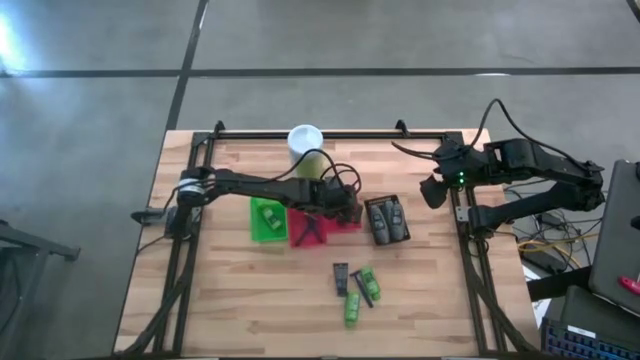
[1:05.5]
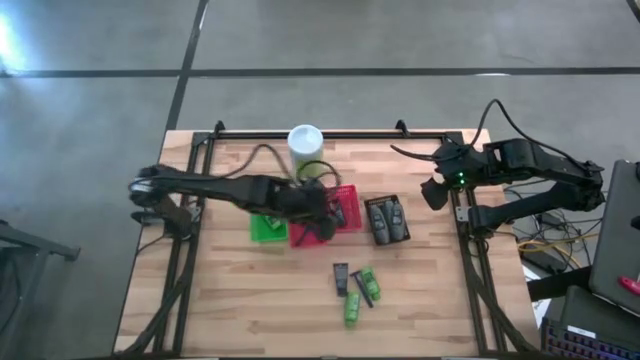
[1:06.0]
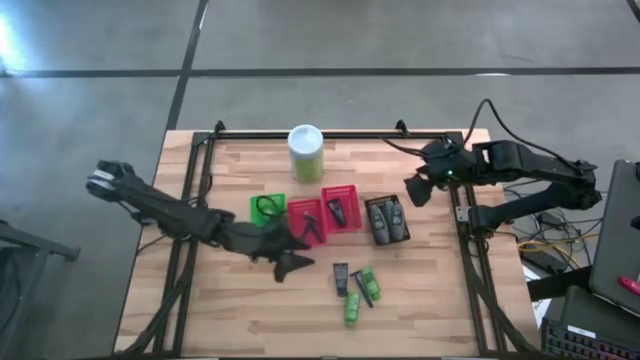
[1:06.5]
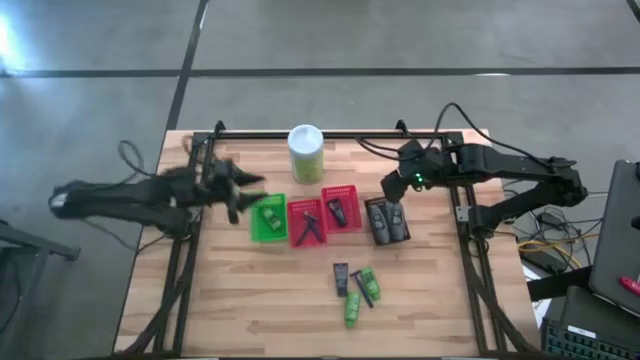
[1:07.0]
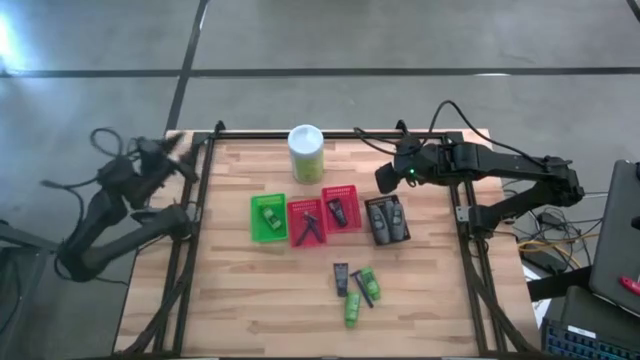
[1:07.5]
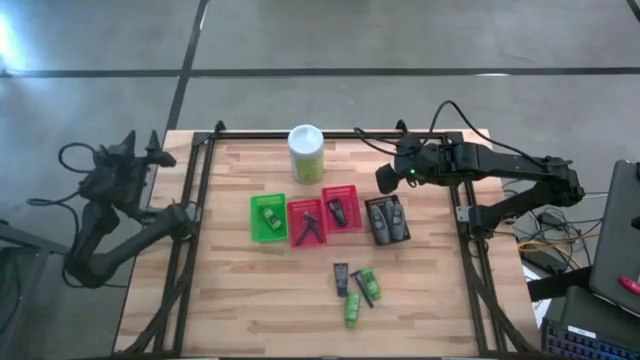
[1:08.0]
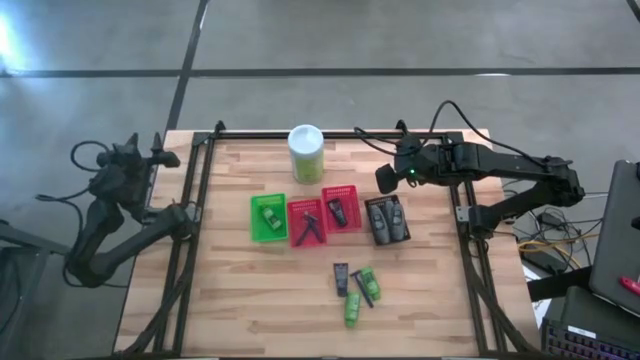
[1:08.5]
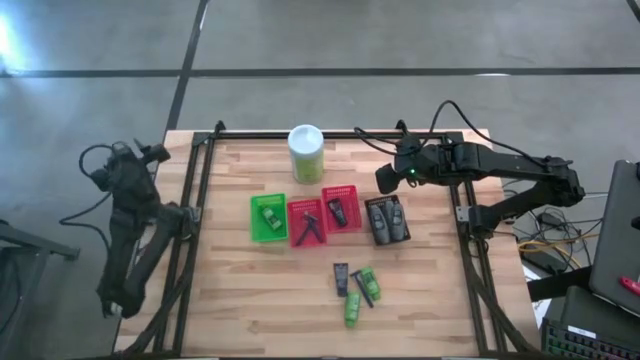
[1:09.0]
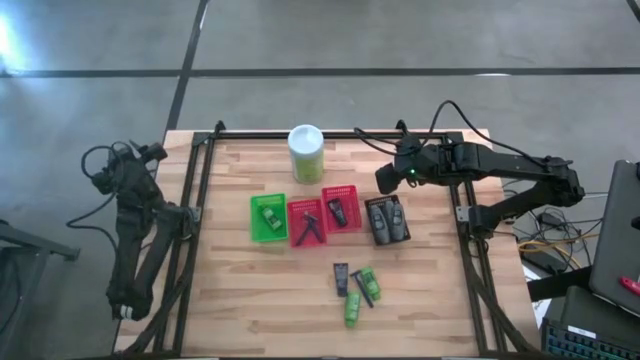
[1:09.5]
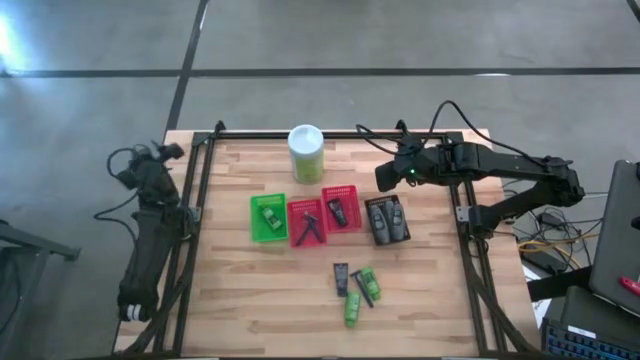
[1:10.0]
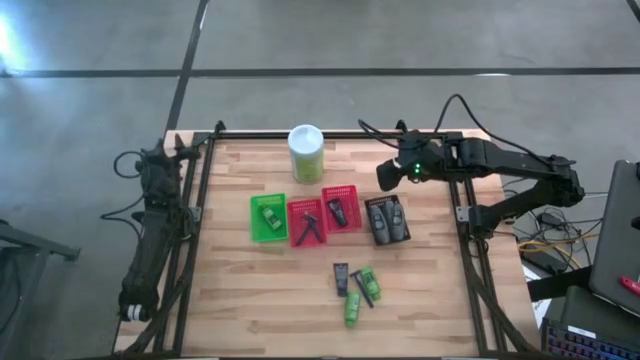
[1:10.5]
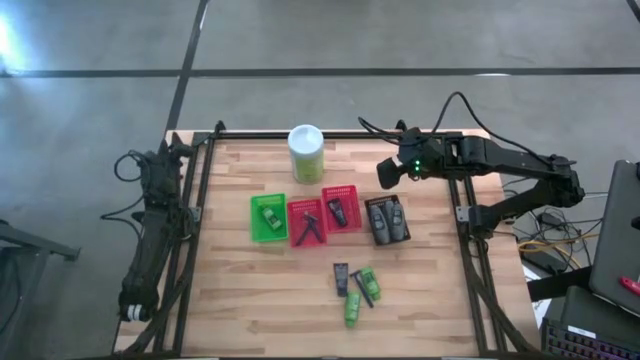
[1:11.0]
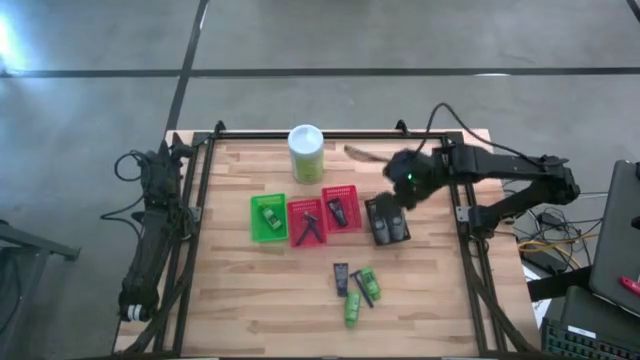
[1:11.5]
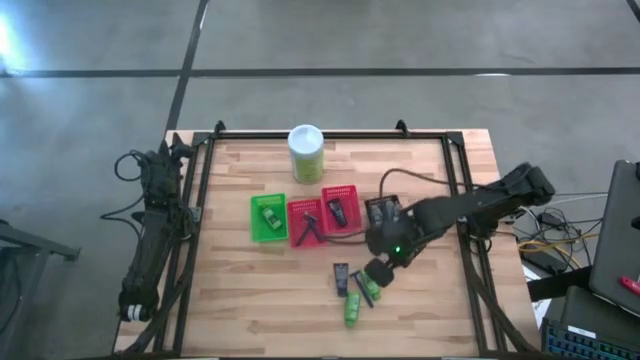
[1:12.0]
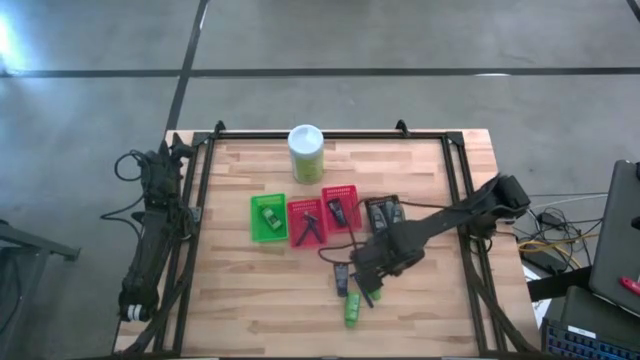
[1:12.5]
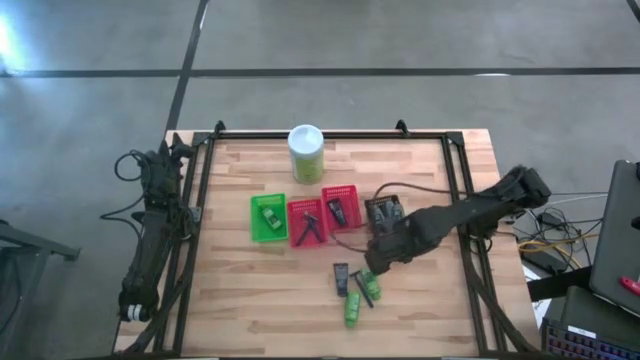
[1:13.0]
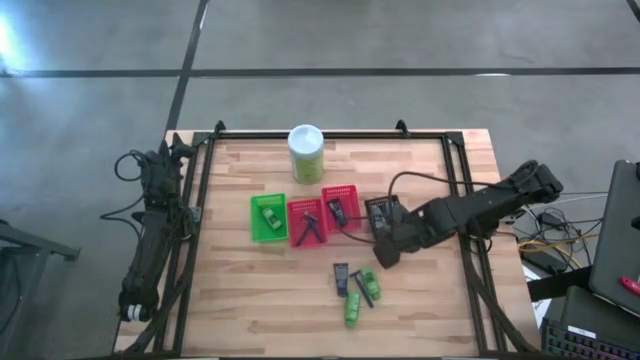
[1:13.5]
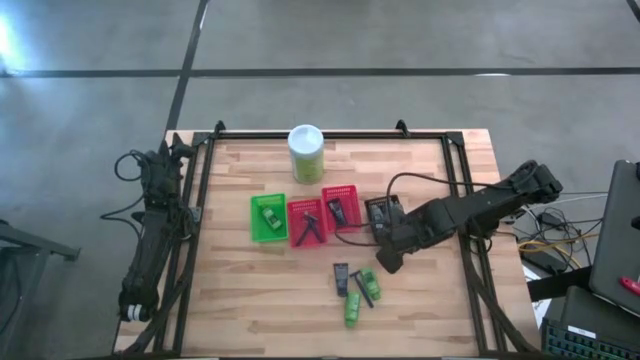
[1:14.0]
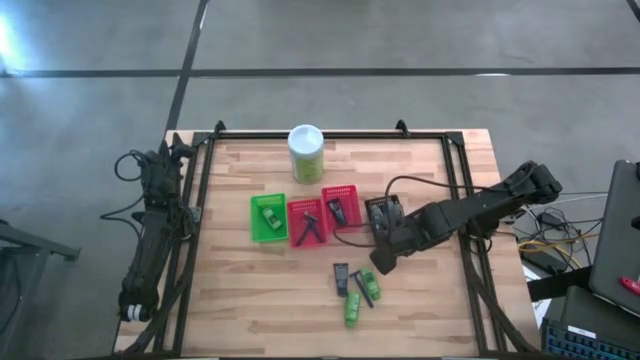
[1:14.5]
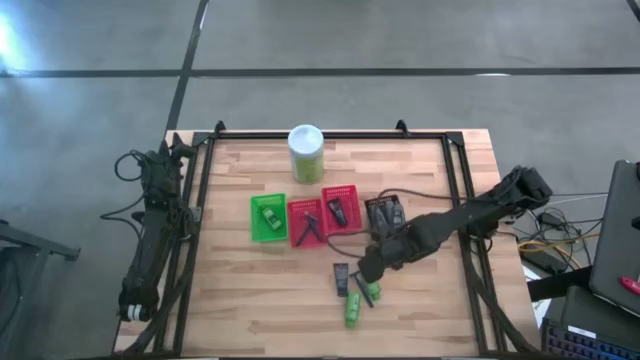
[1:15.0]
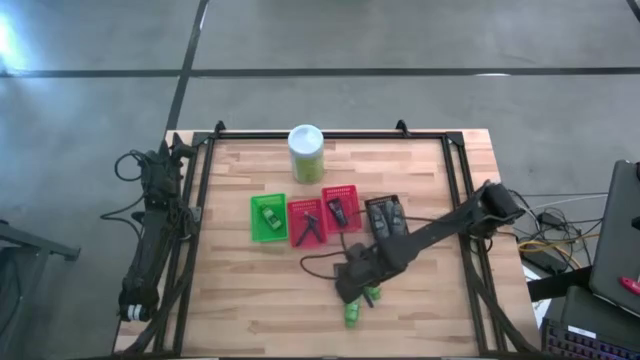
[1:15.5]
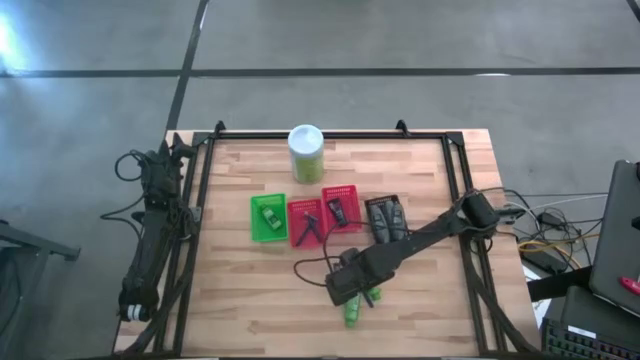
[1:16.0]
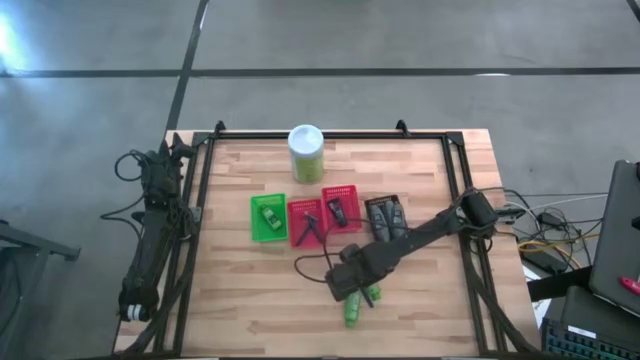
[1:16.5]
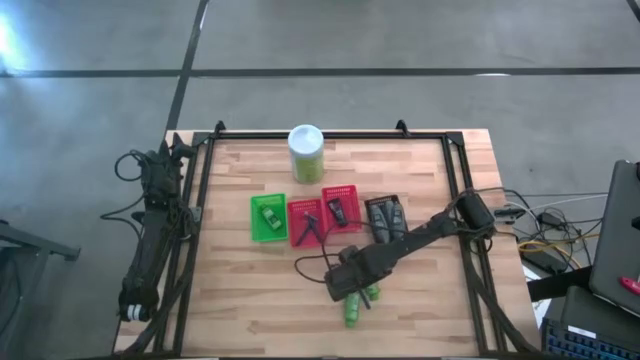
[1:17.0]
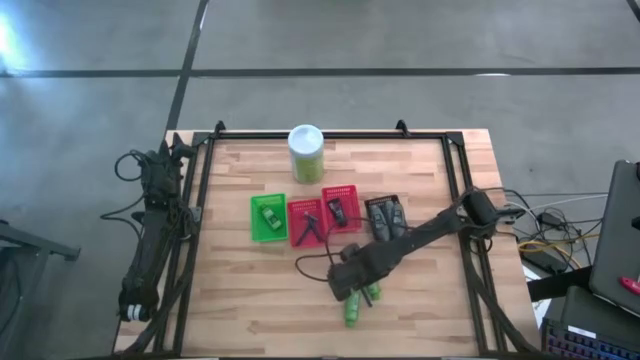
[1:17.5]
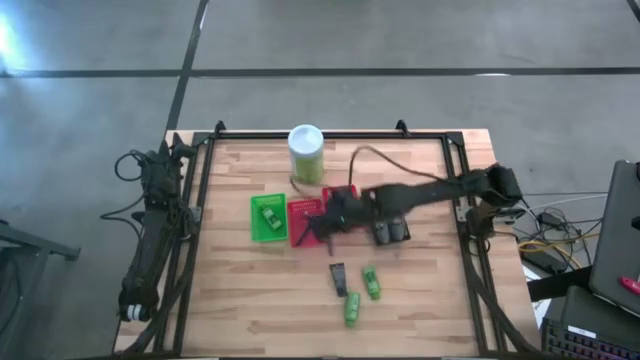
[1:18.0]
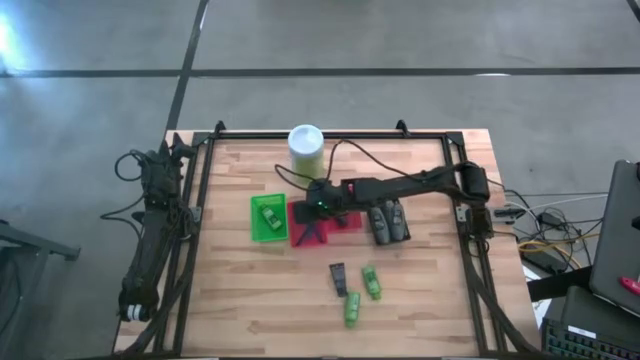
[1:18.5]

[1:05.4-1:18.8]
Task: Pick & Place Travel size toiletries
Put the blue razor into the left orange bin

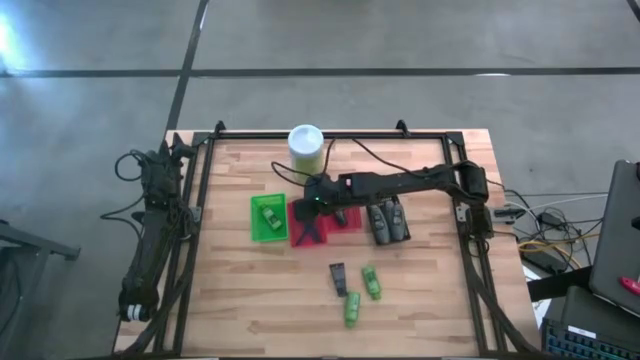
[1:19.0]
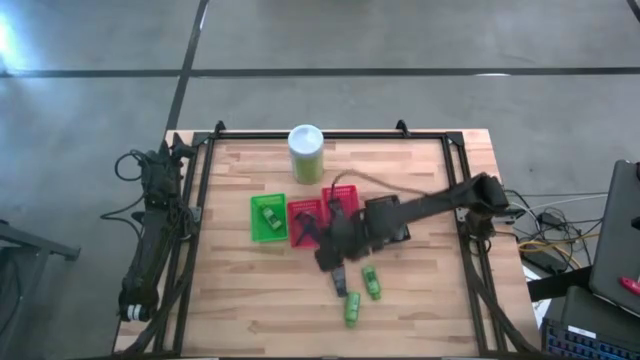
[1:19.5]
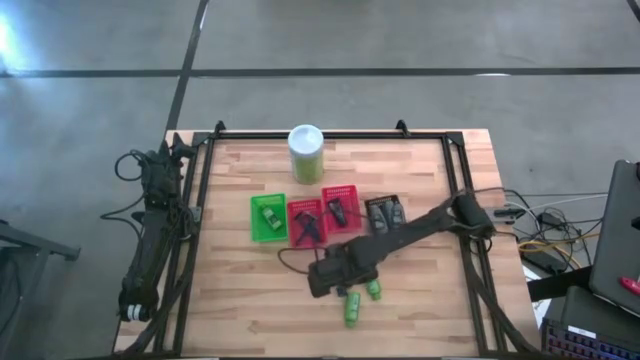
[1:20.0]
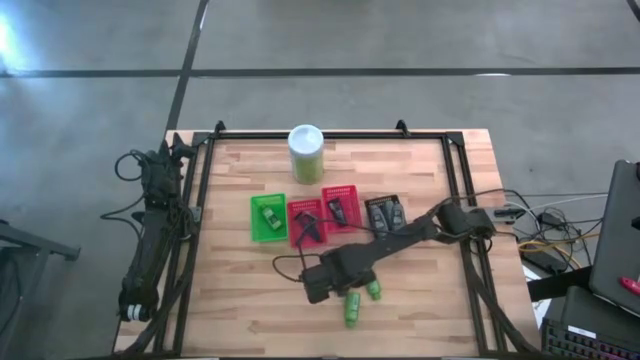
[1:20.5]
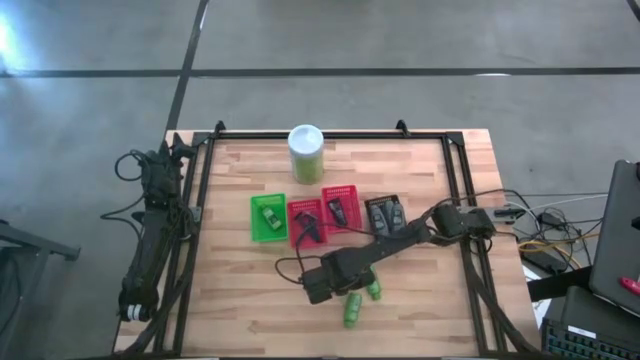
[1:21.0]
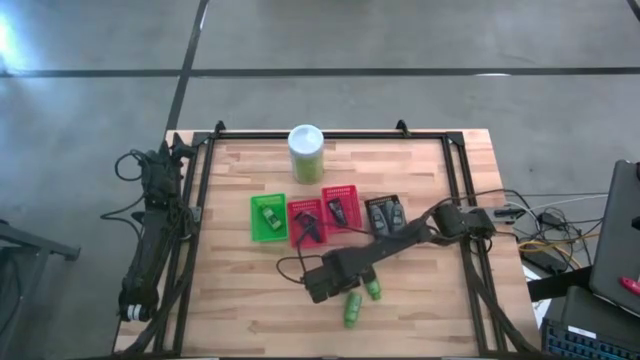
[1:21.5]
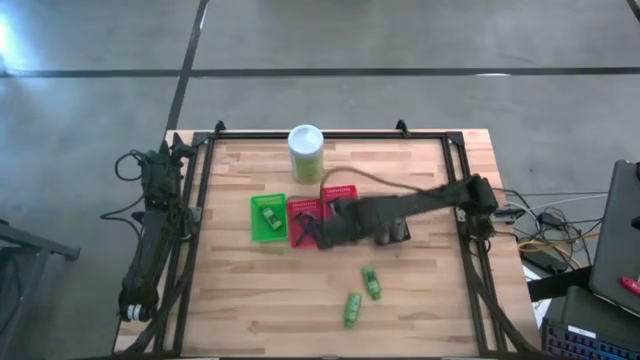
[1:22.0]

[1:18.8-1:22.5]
Put the blue shave cream into the right orange bin

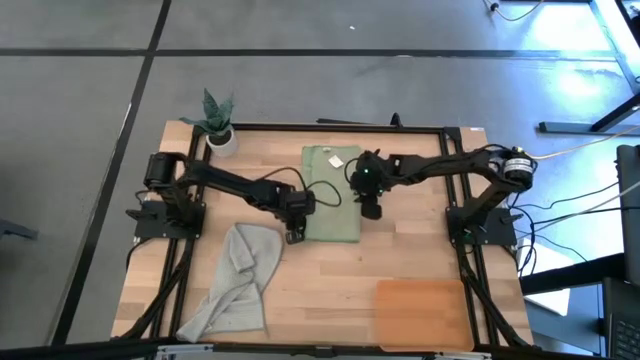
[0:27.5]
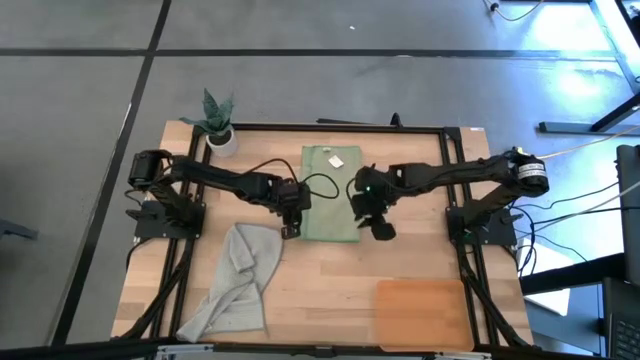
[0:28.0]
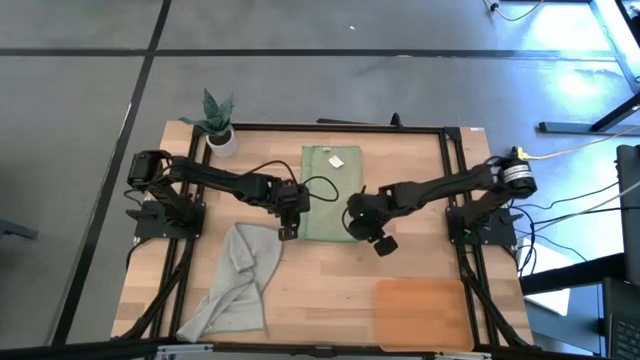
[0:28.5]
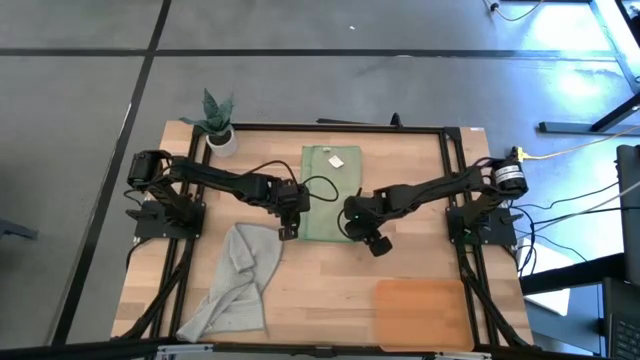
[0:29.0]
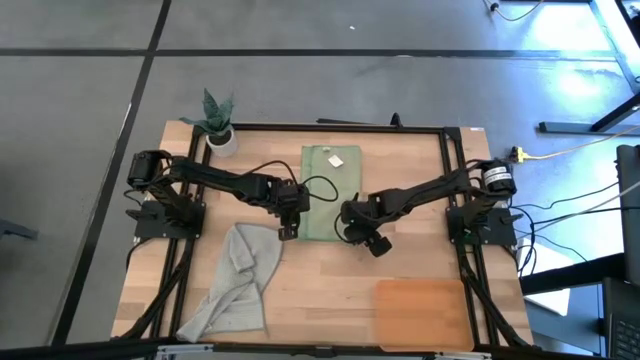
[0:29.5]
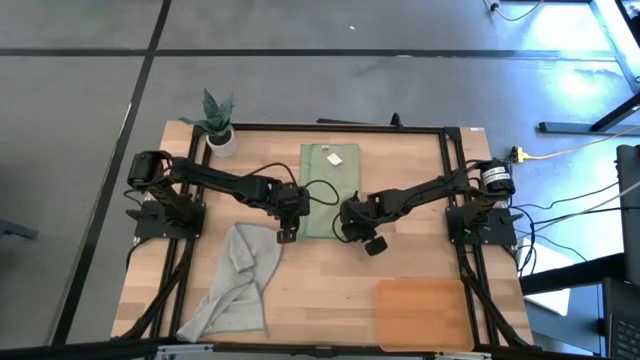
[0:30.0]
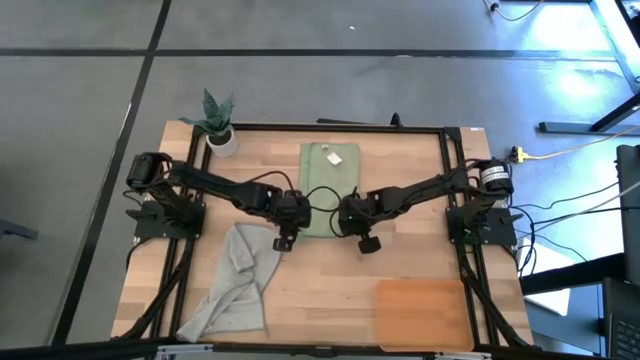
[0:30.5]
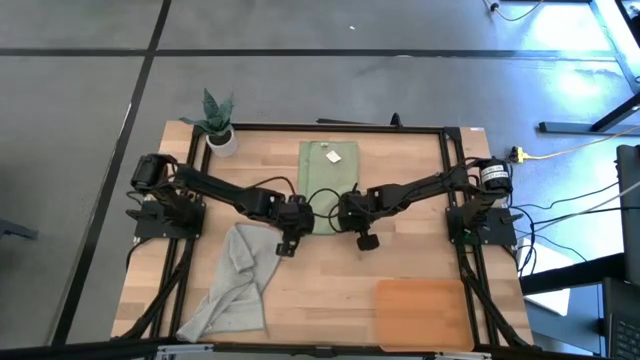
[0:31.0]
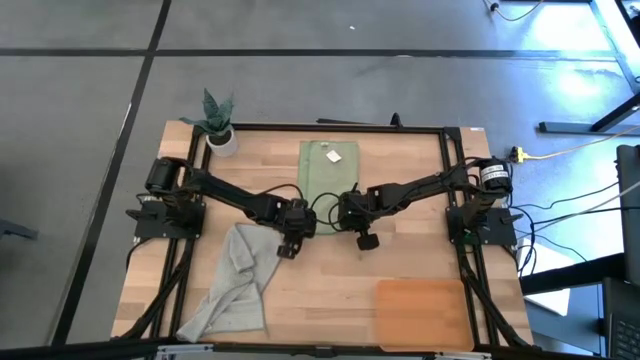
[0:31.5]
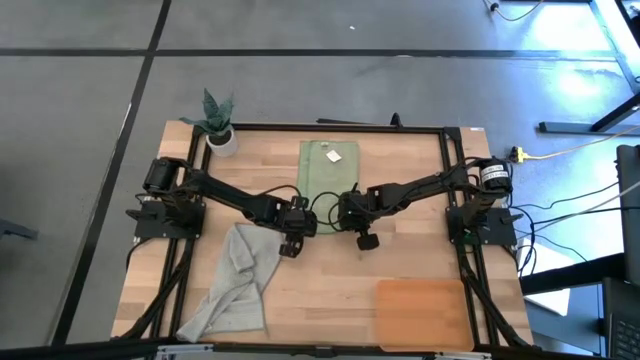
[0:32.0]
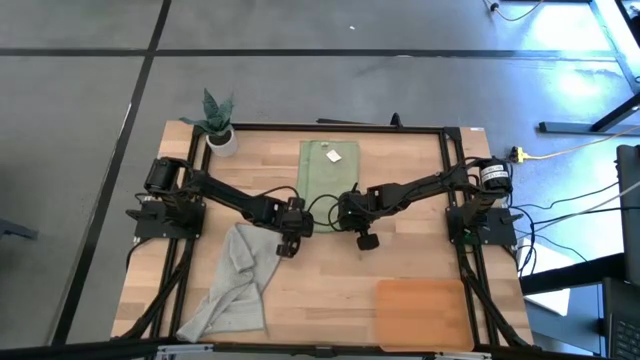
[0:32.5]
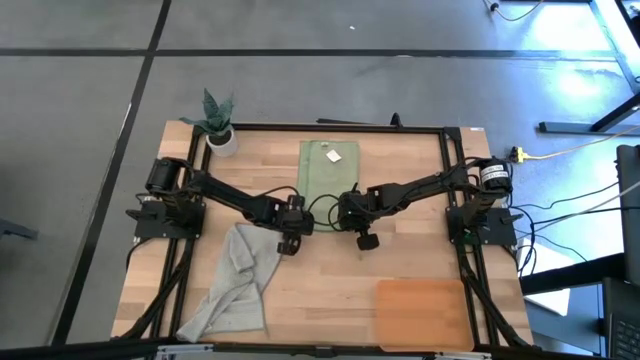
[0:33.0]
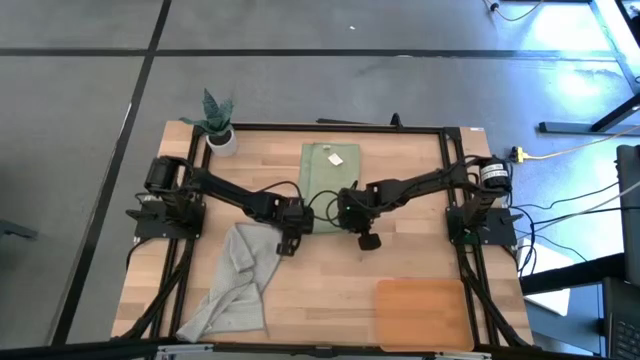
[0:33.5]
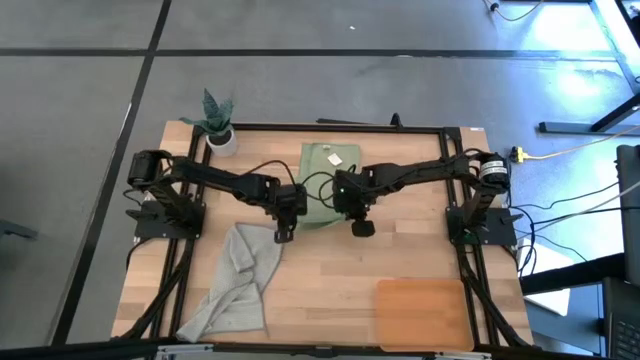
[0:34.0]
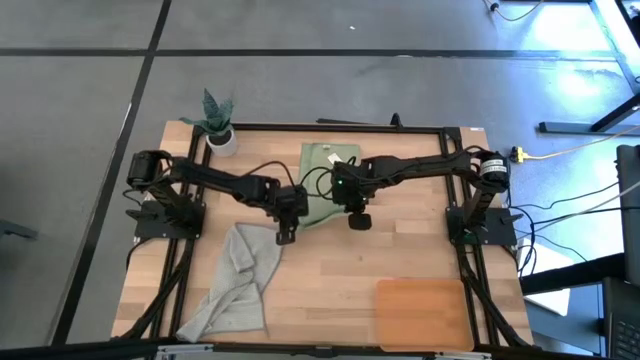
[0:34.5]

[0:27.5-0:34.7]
Task: Roll microfiber towels into tight, uniform cylinder then place into a basket
Roll the green microfiber cloth
